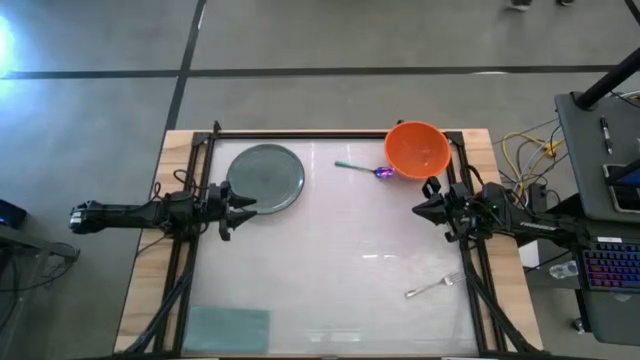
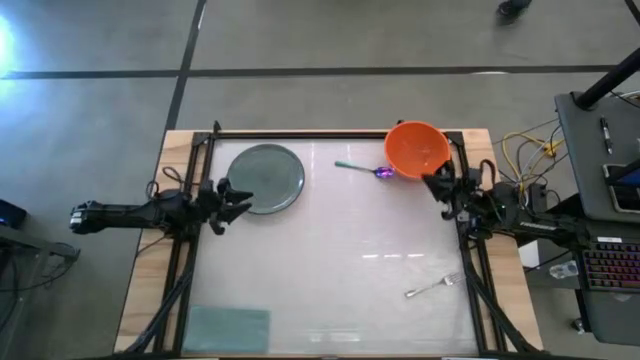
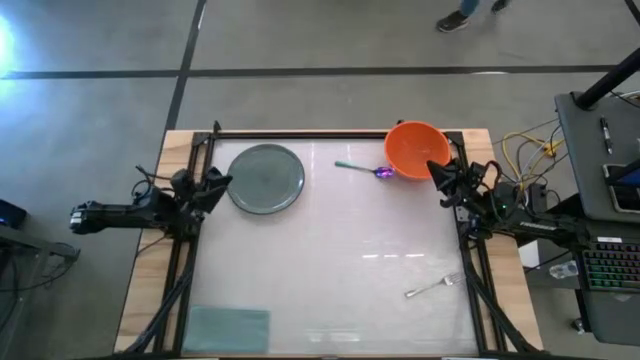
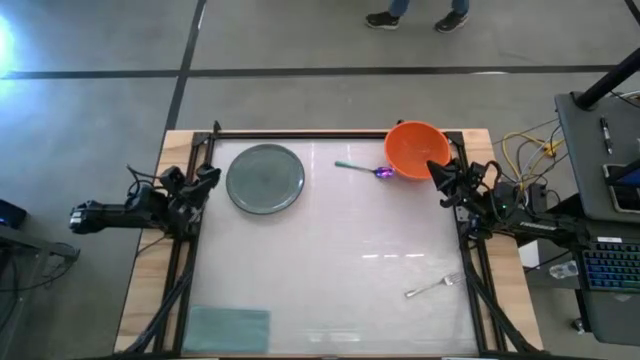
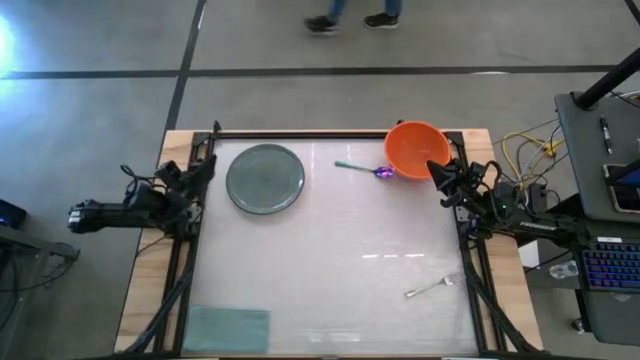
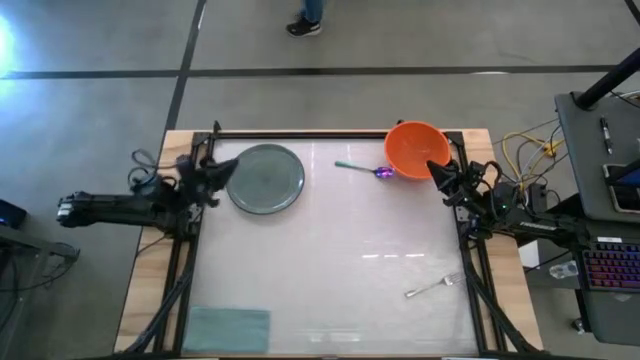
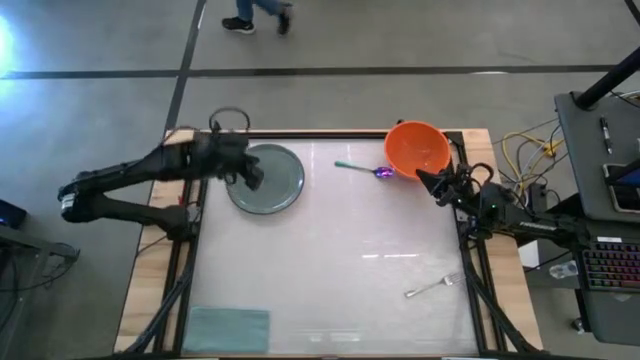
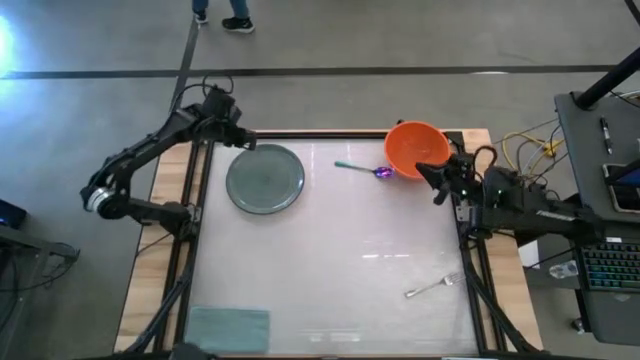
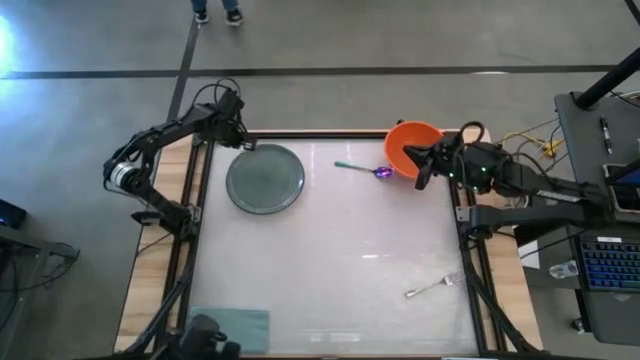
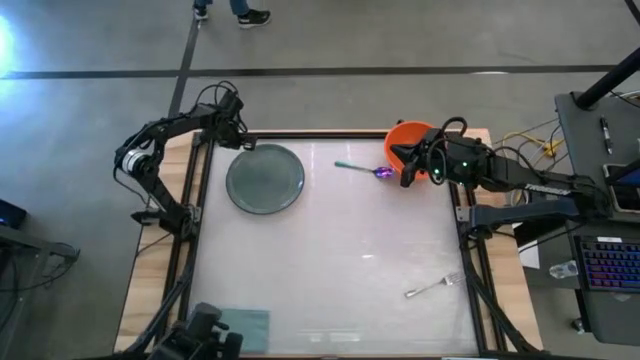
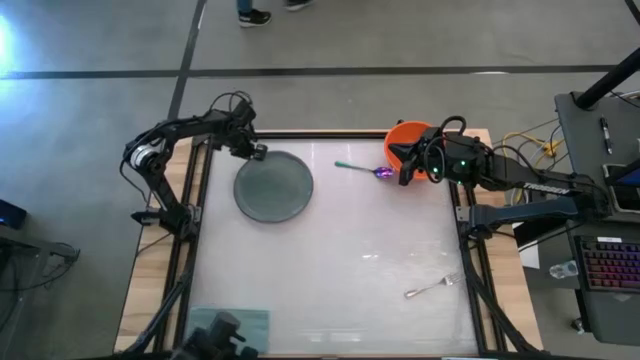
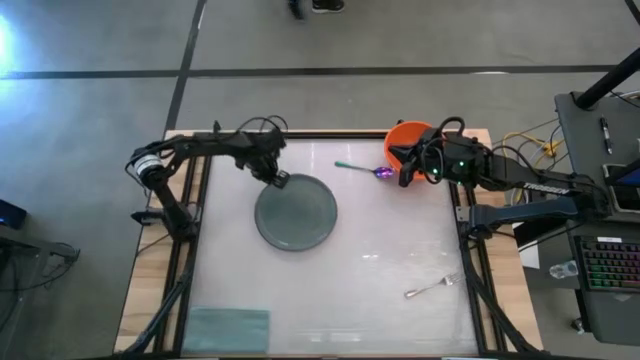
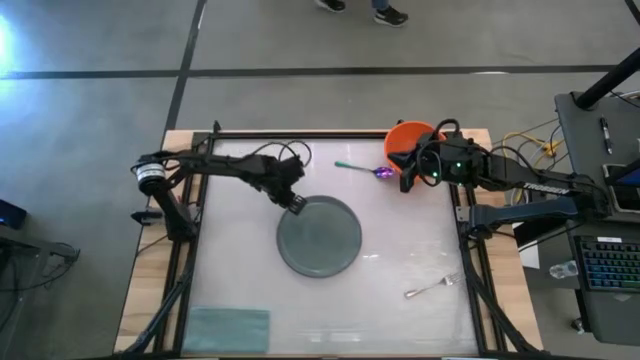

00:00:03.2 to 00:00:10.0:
Task: Set table place
Move the gray plate to the center of the table

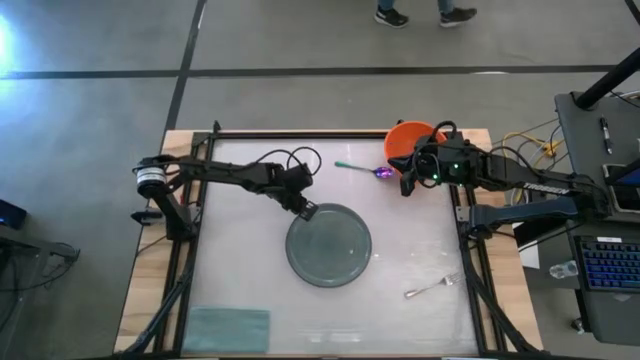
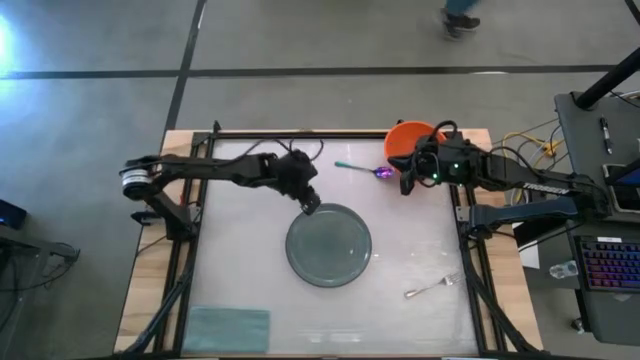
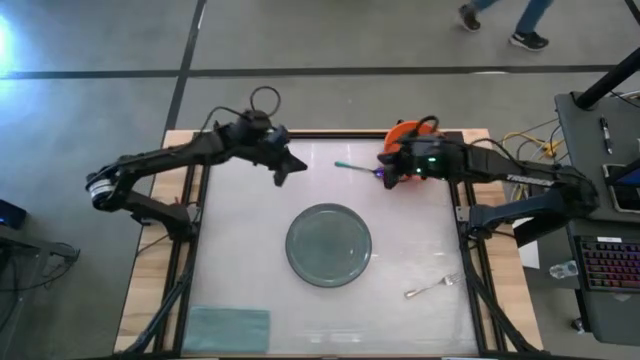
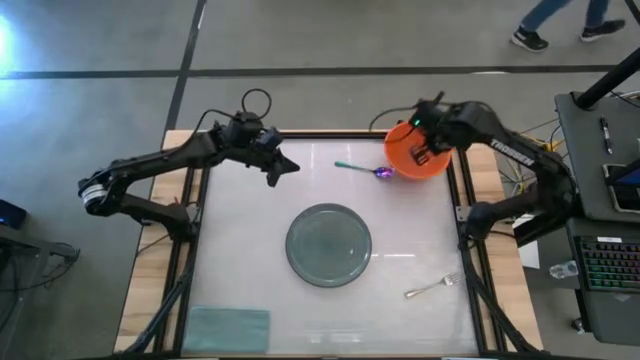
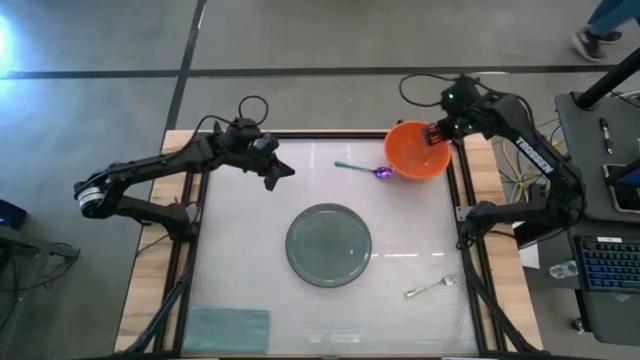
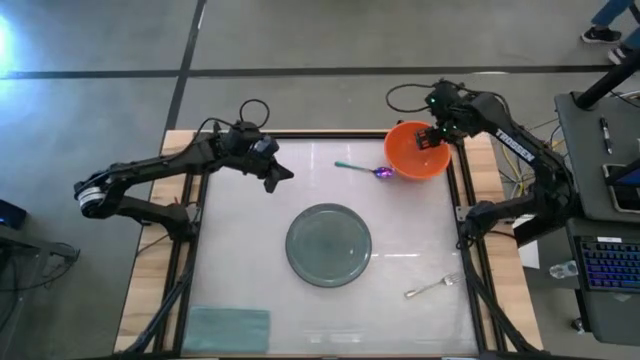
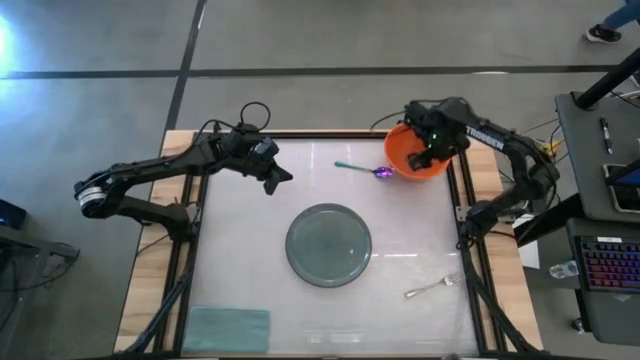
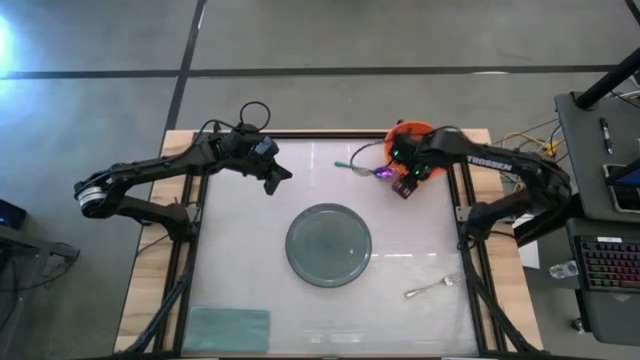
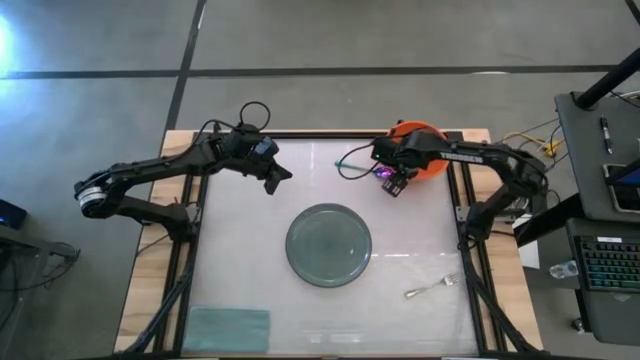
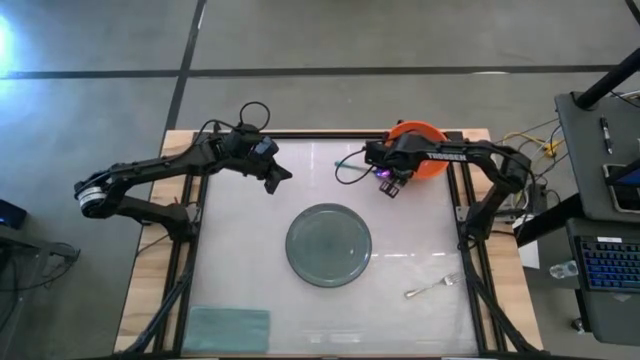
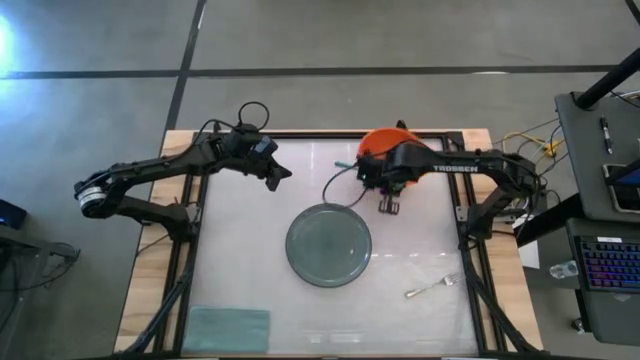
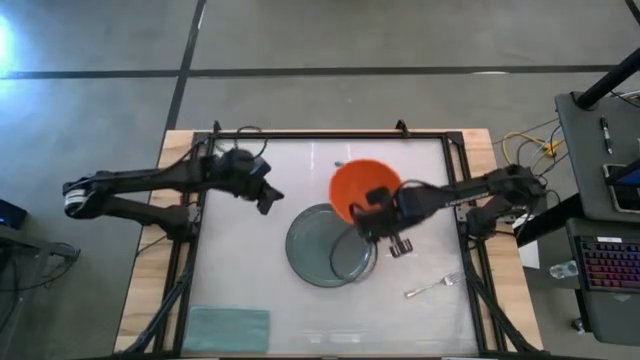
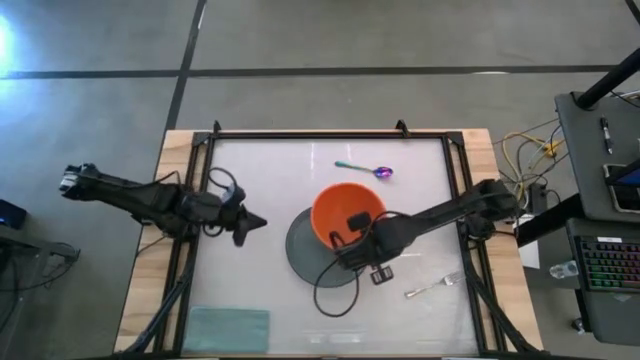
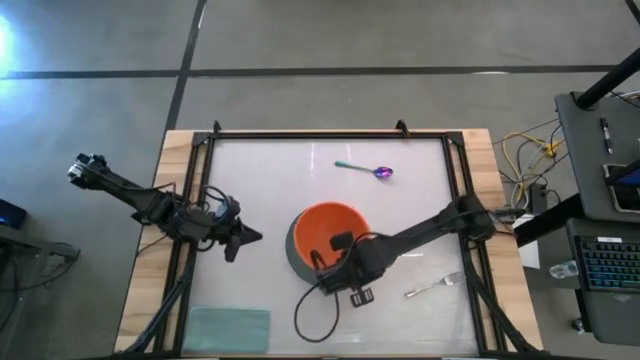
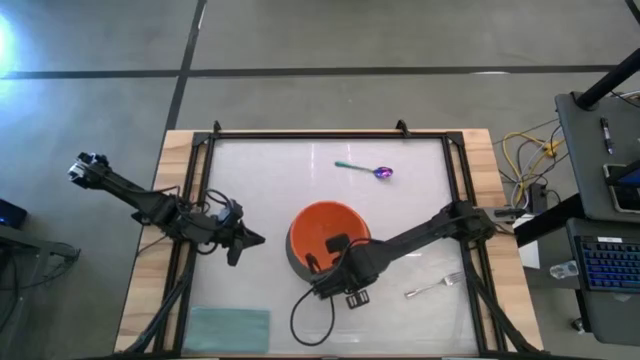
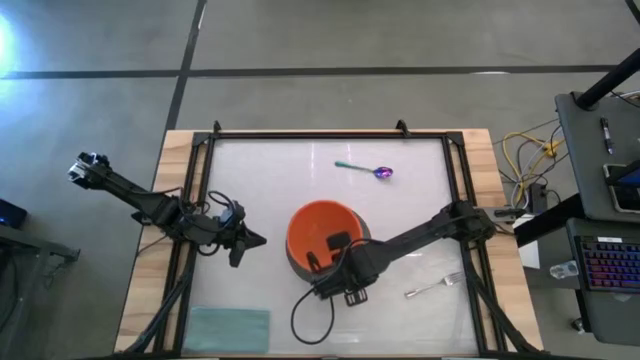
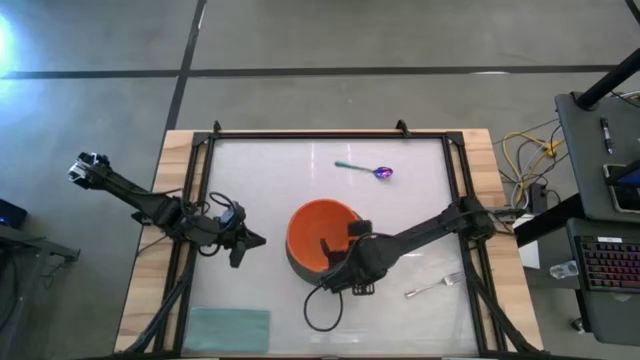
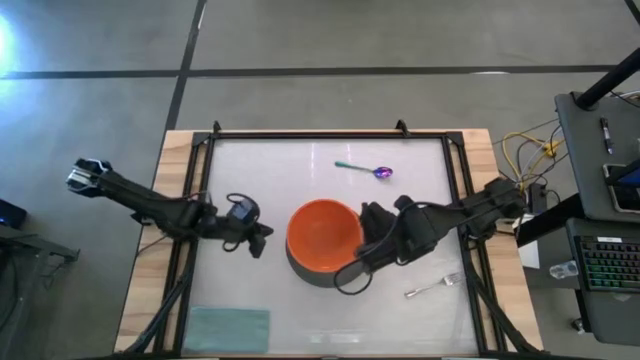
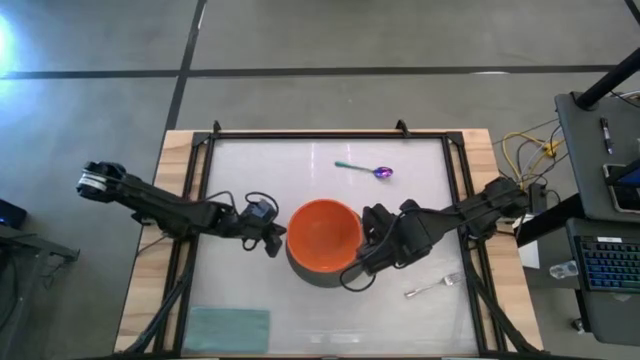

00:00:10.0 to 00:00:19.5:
Stack the orange bowl on the gray plate

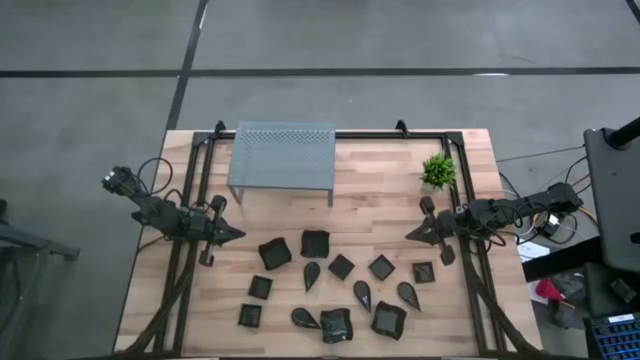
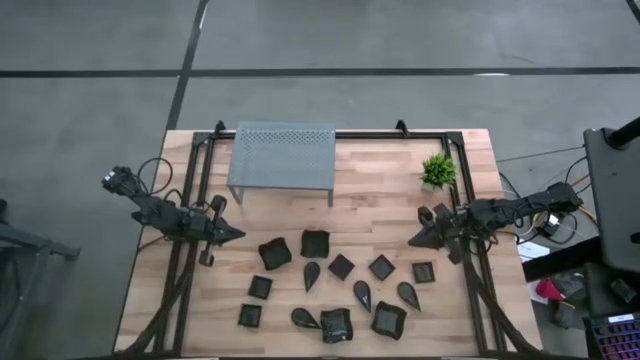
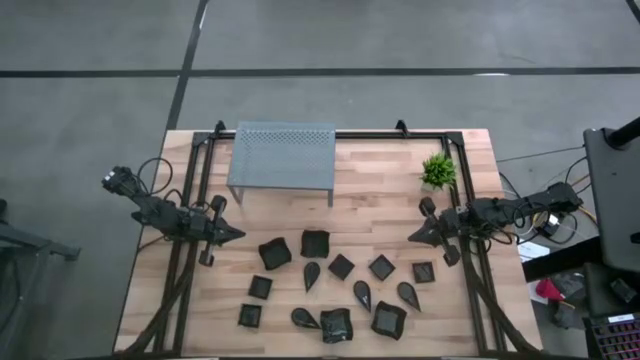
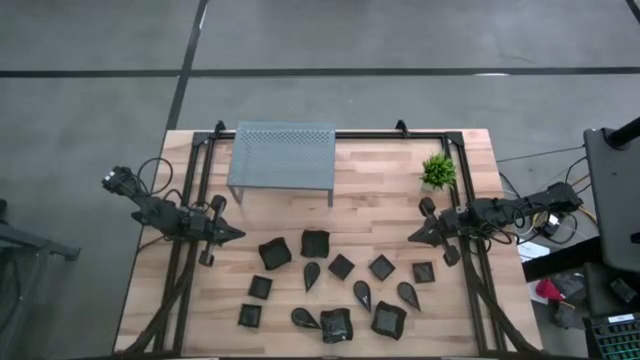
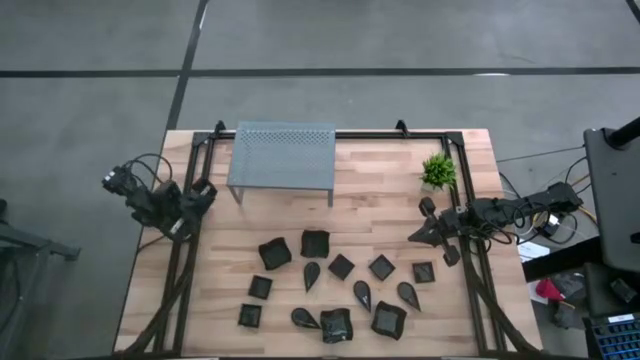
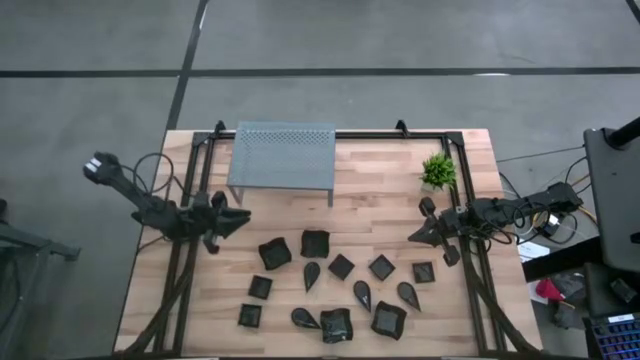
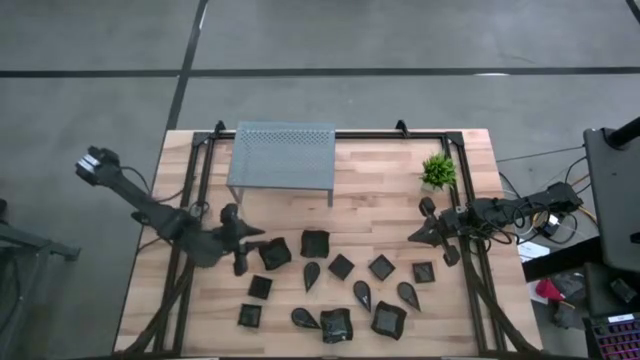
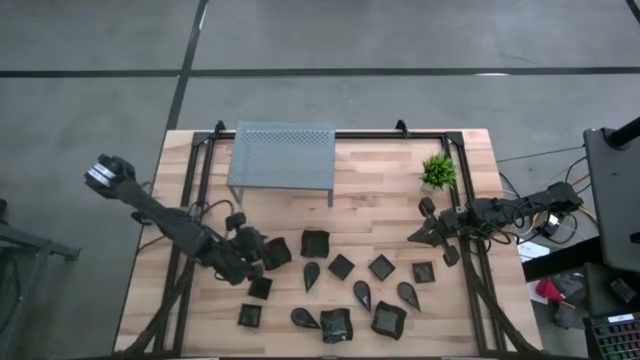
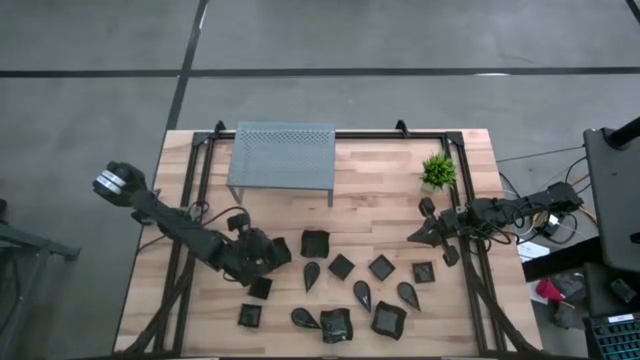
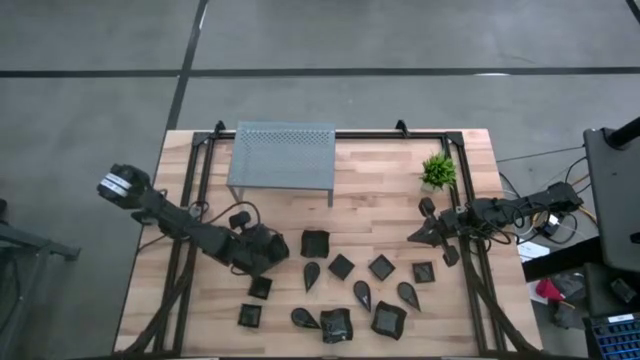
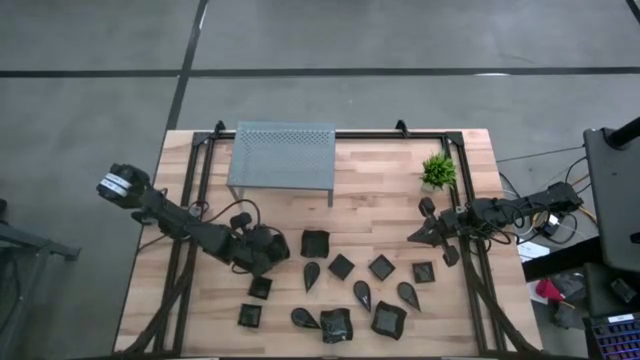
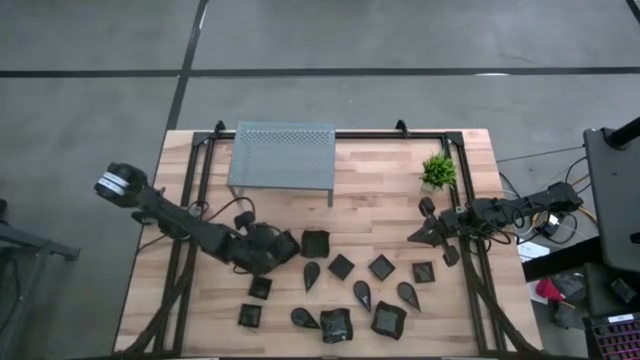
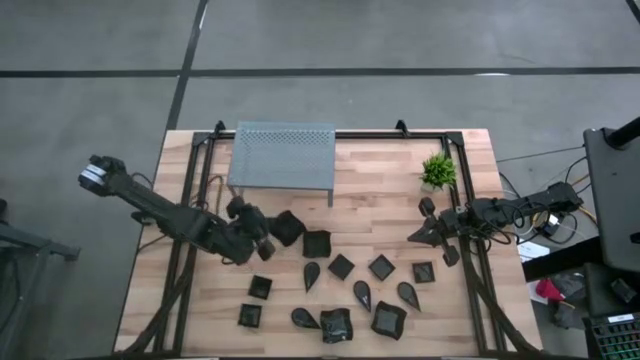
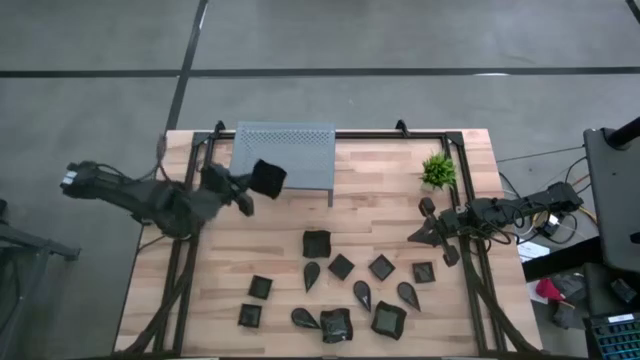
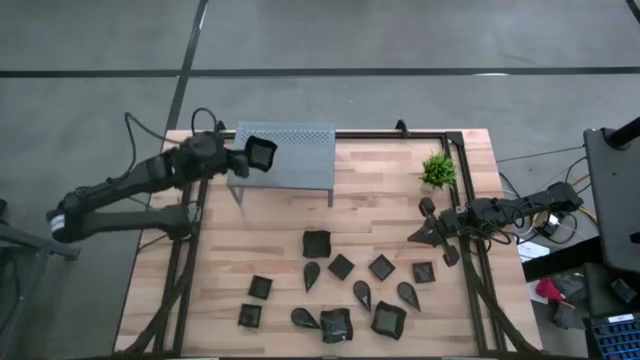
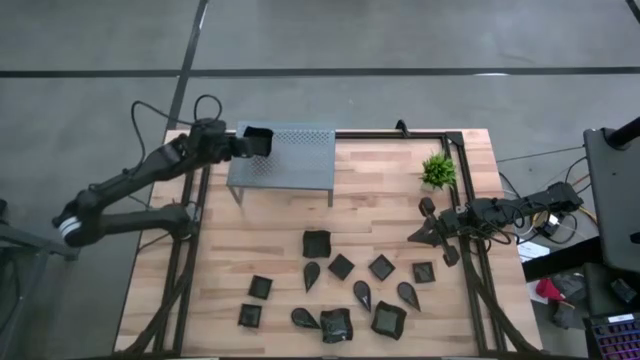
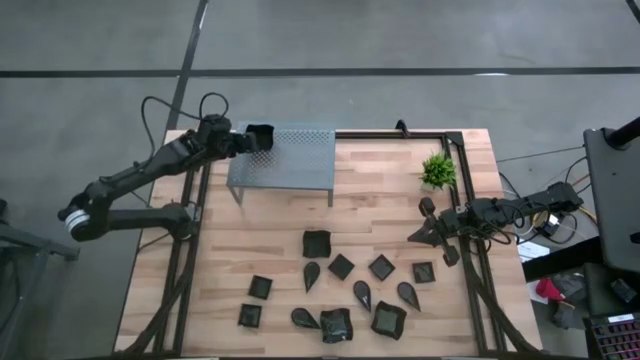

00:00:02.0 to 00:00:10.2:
Task: Pick & Place Mini shaped plates
Put the black distorted square plate on the shelf
